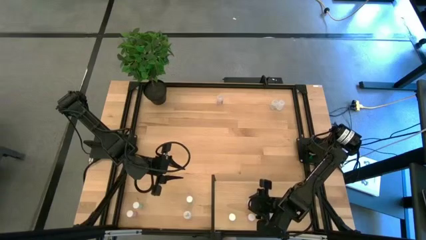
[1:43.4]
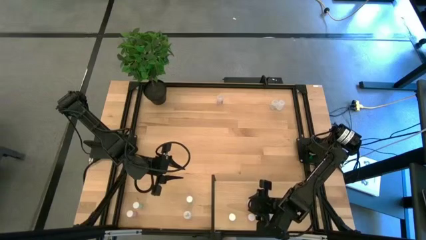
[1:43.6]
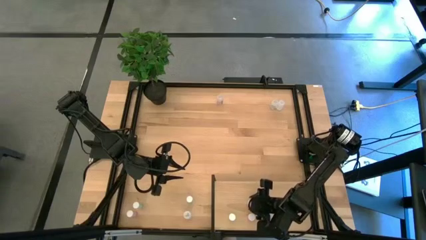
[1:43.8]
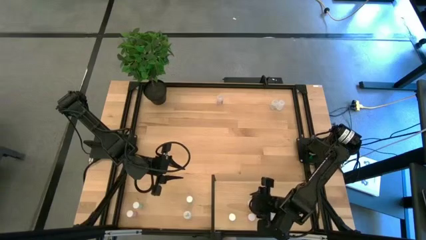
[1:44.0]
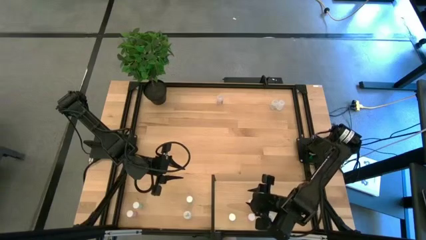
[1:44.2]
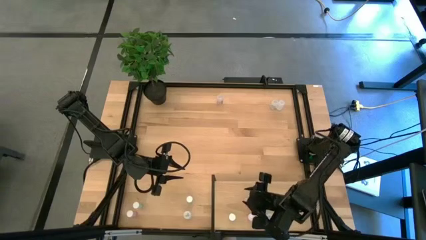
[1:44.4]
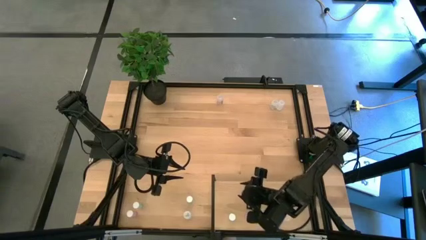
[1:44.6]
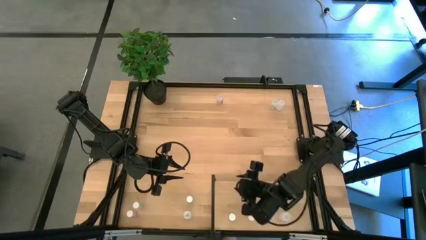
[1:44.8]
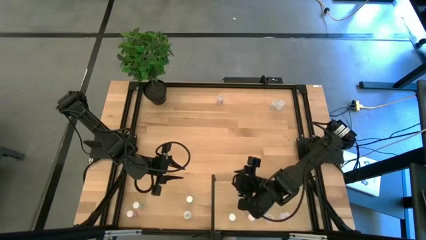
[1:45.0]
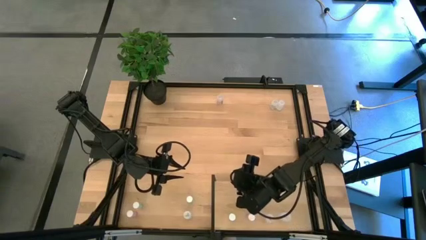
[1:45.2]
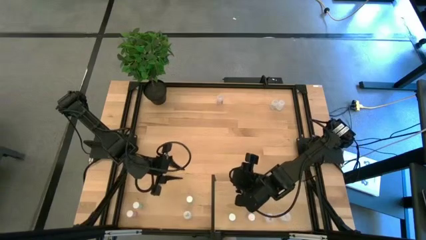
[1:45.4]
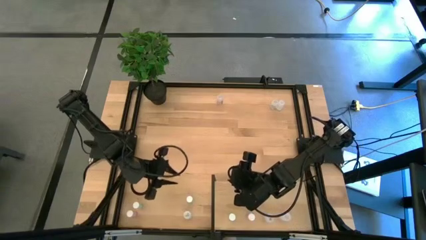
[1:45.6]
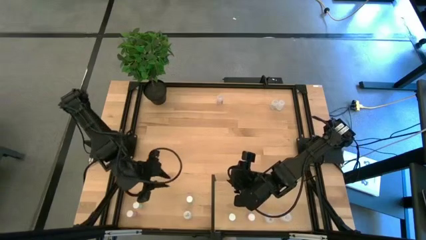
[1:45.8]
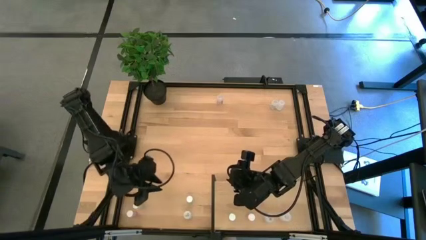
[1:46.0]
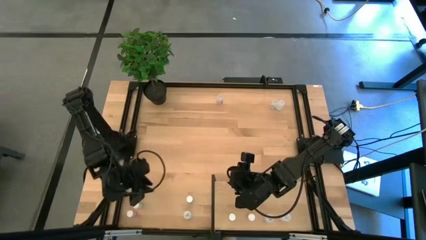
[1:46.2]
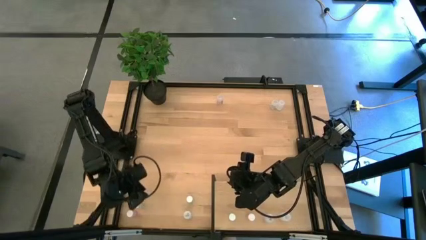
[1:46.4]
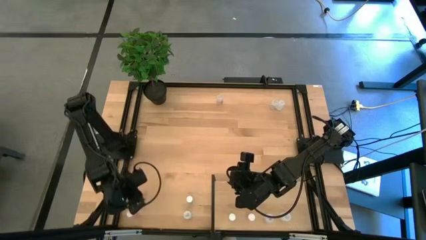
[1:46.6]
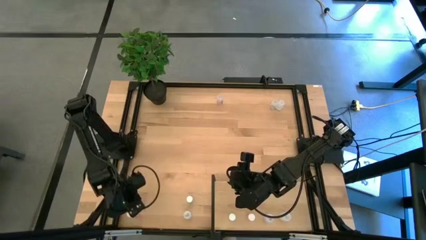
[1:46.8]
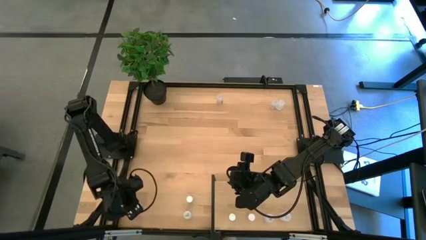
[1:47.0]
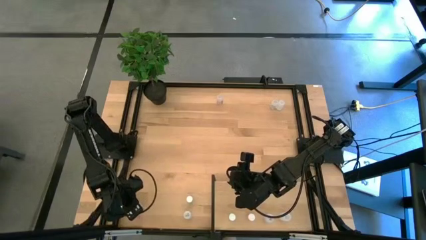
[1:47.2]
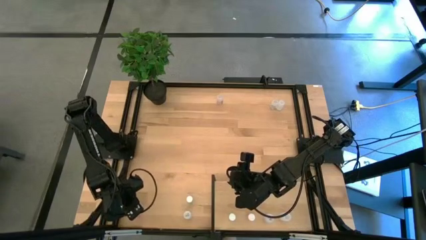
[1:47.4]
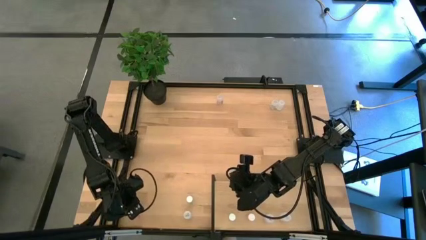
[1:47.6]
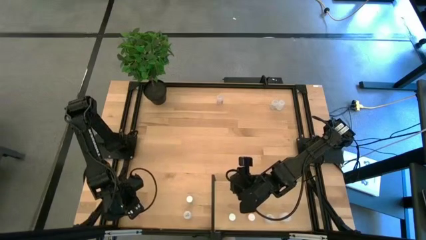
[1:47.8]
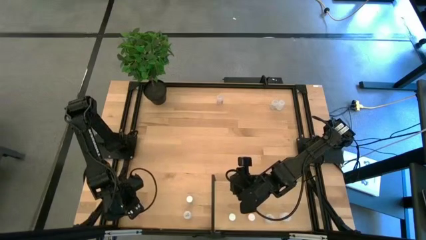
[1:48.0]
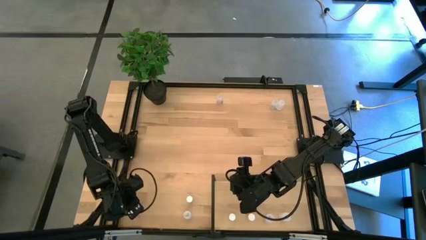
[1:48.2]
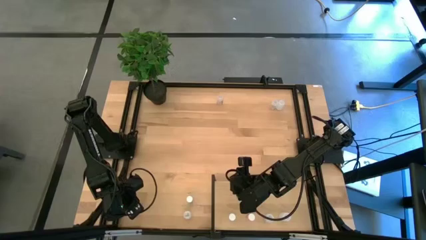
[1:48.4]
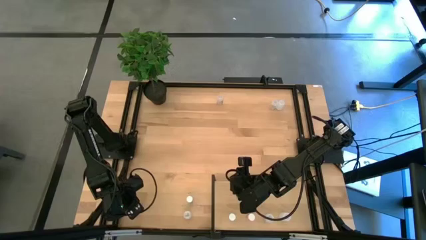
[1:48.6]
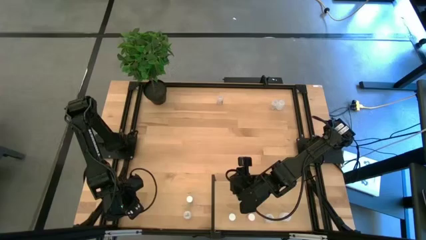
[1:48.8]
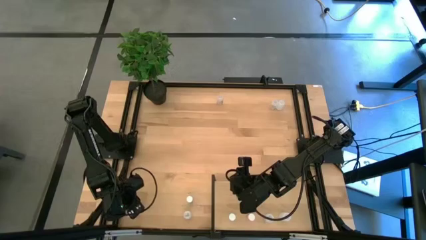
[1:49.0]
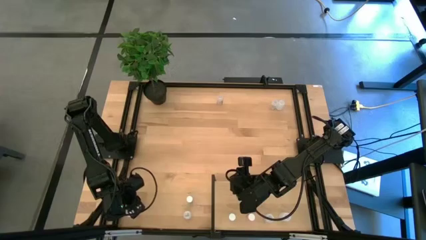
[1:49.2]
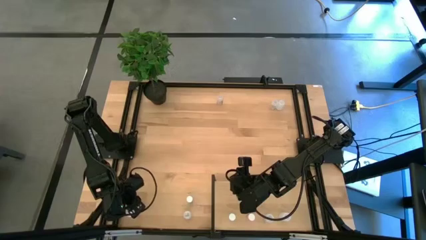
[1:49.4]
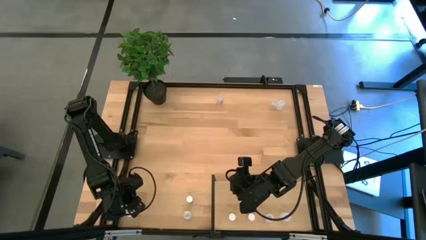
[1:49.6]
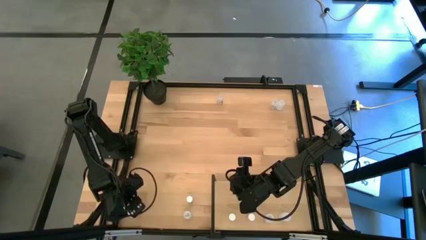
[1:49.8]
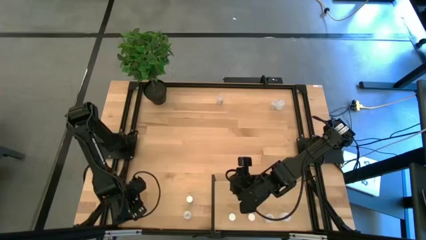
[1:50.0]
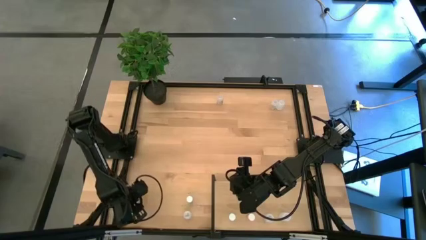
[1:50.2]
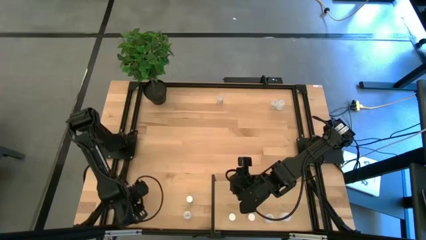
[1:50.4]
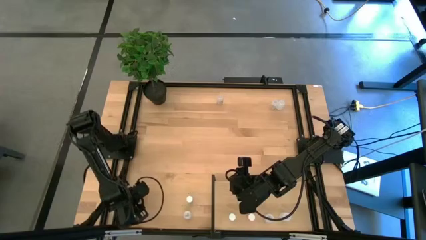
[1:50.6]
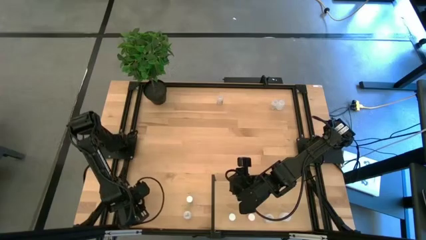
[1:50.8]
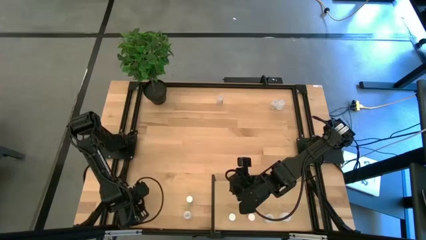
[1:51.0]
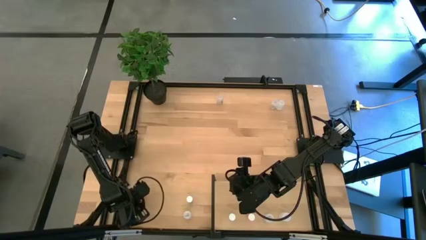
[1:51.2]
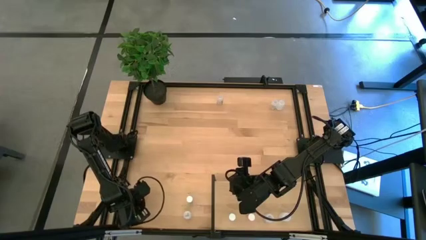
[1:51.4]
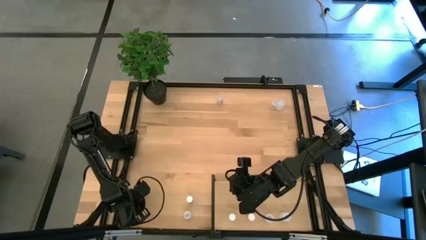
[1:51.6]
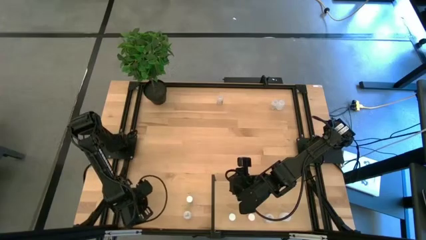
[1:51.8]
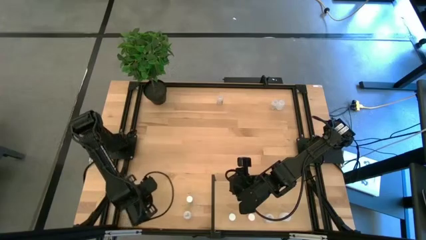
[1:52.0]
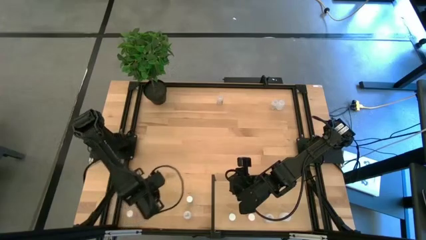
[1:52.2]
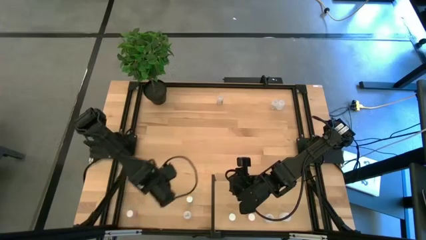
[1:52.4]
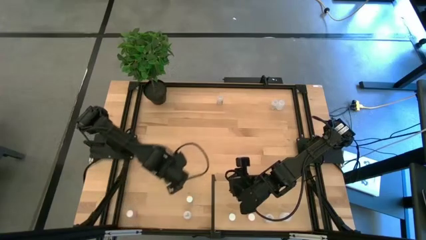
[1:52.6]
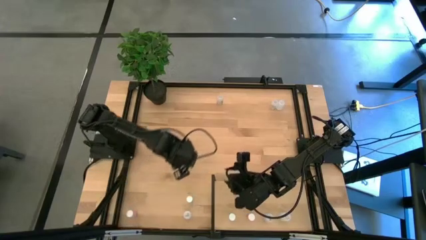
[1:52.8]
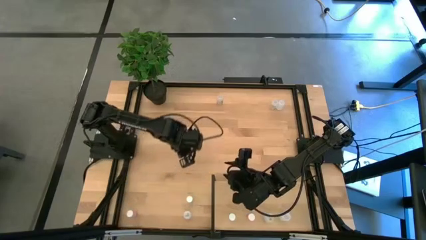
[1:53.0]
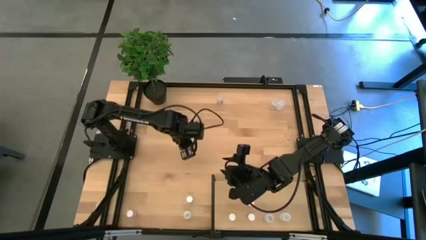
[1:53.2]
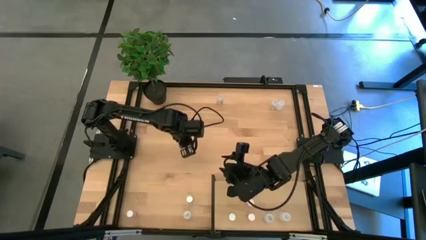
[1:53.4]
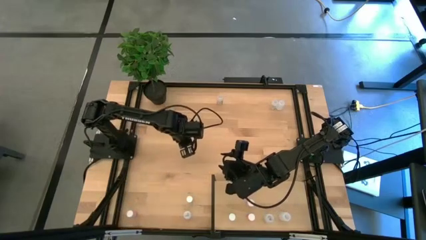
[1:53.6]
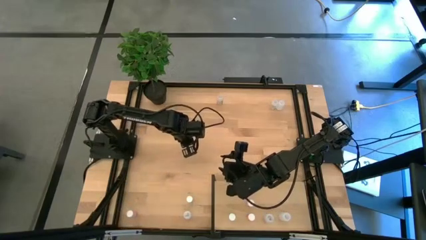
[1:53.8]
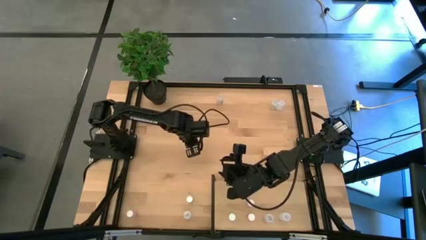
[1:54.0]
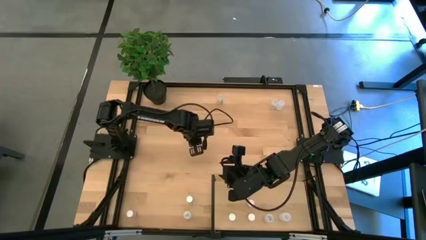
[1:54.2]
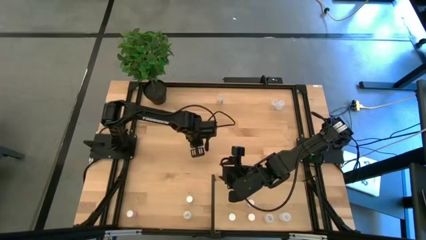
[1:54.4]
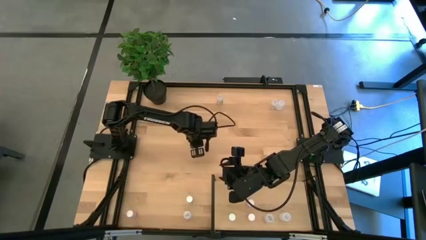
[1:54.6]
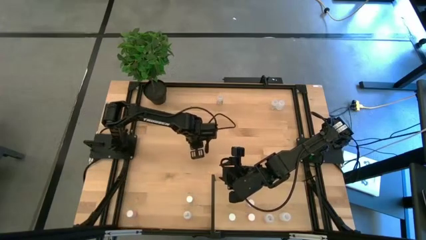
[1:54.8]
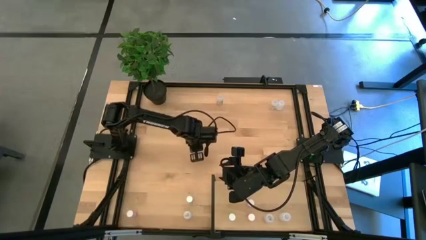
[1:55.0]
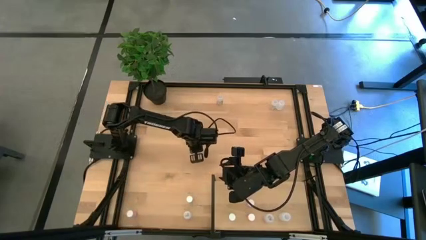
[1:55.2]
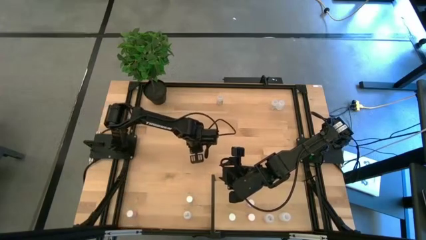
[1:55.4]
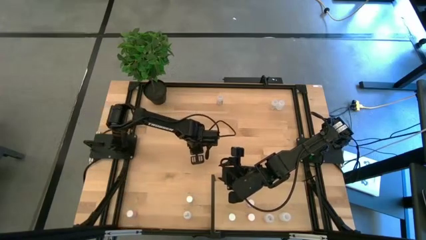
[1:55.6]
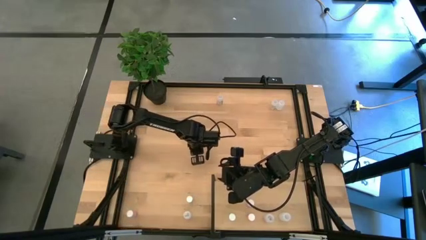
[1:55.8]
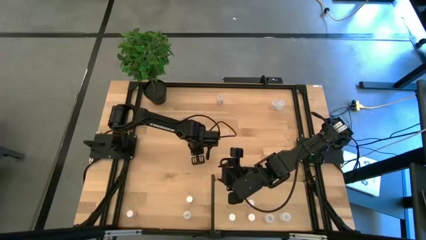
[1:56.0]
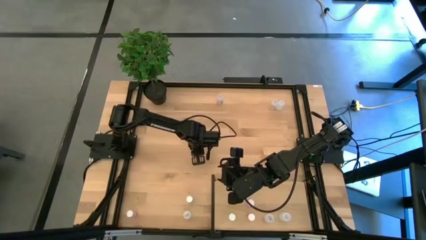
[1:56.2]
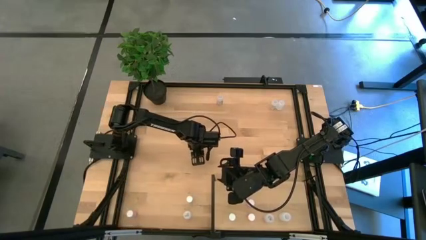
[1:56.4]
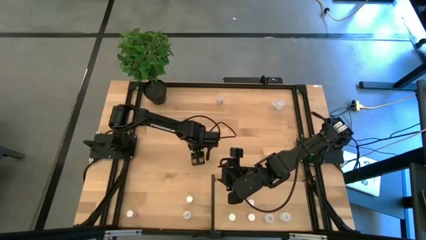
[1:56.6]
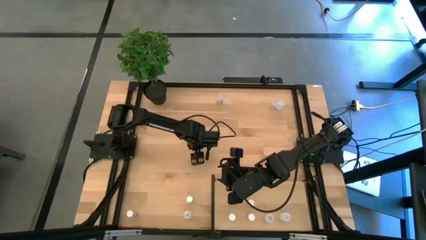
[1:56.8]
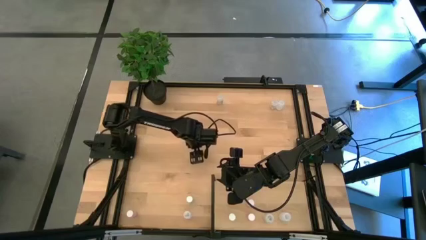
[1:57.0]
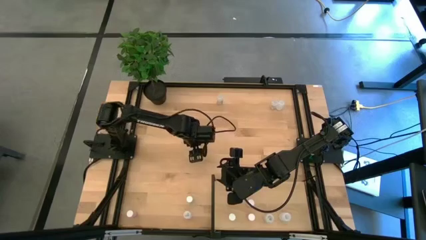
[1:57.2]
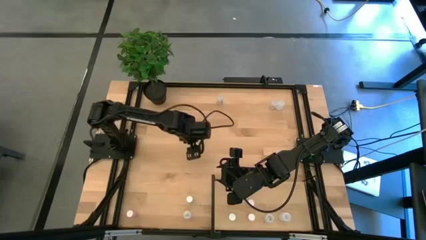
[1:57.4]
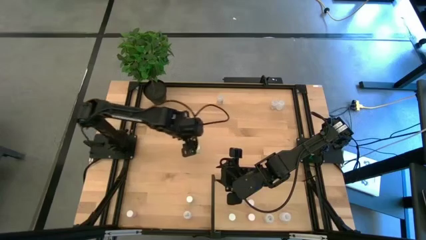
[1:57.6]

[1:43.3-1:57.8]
Task: Pick and place medicine bottles onto shelf by color
Put the left green pill bottle on the shelf aligned with the other green pill bottle
